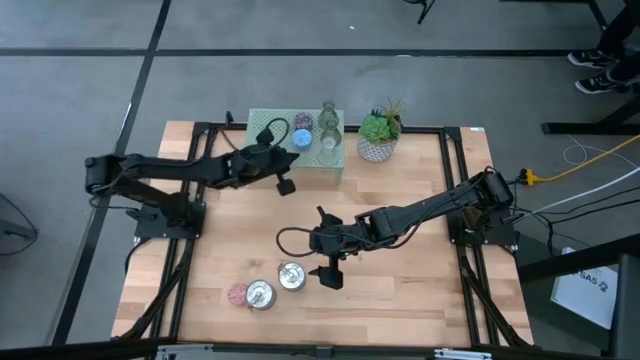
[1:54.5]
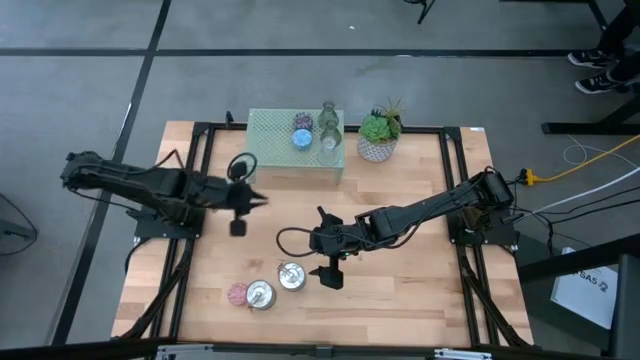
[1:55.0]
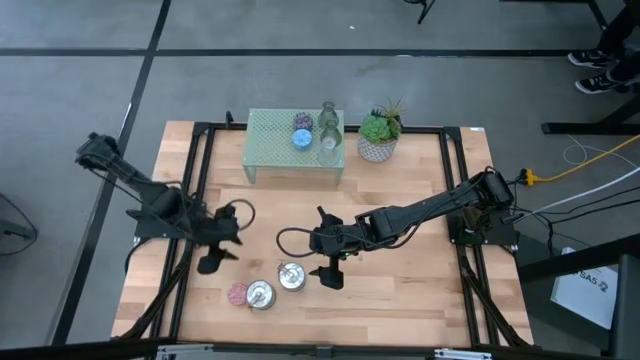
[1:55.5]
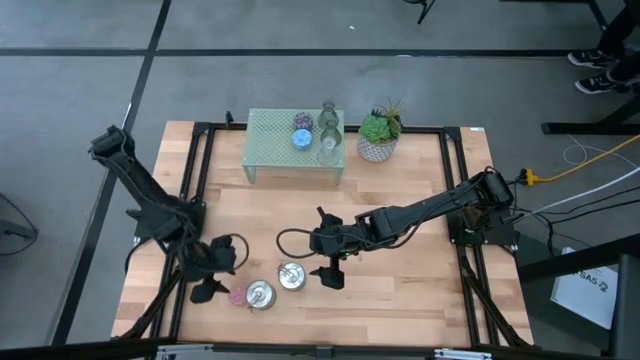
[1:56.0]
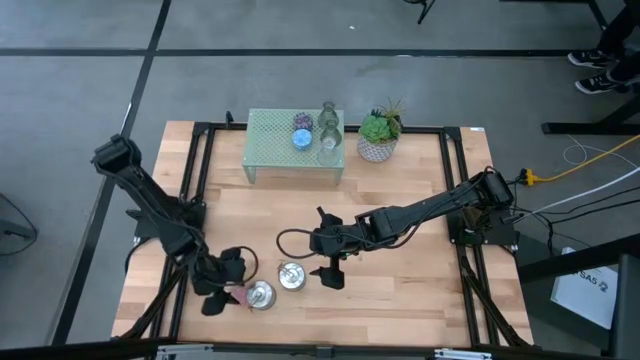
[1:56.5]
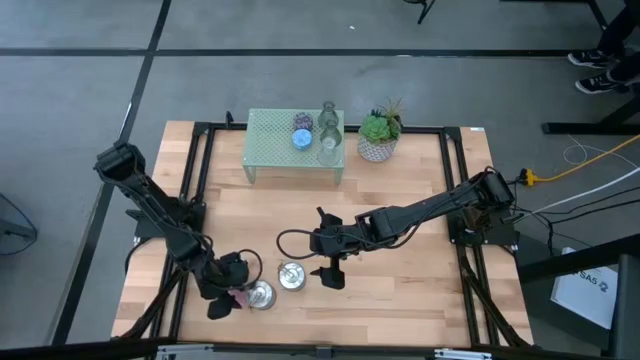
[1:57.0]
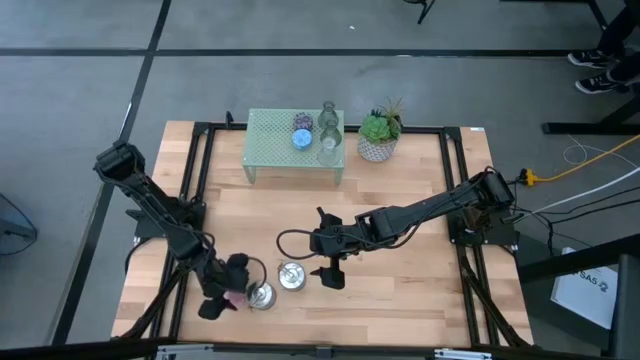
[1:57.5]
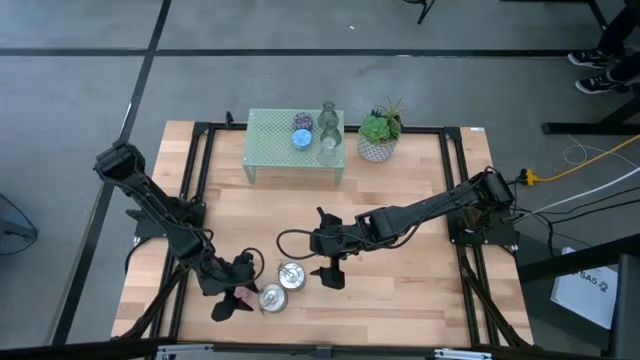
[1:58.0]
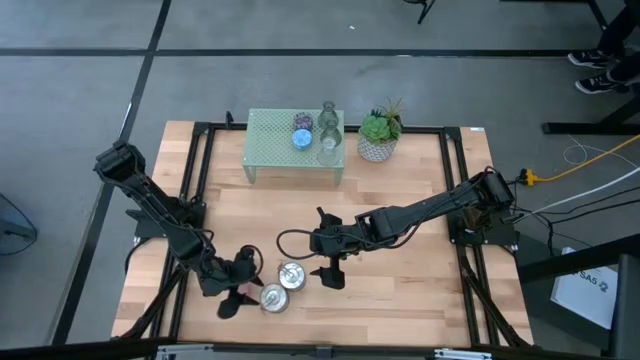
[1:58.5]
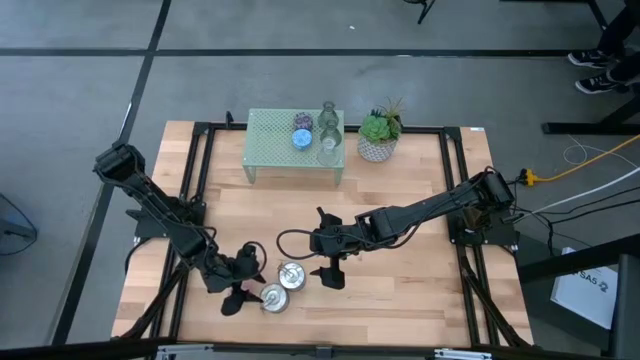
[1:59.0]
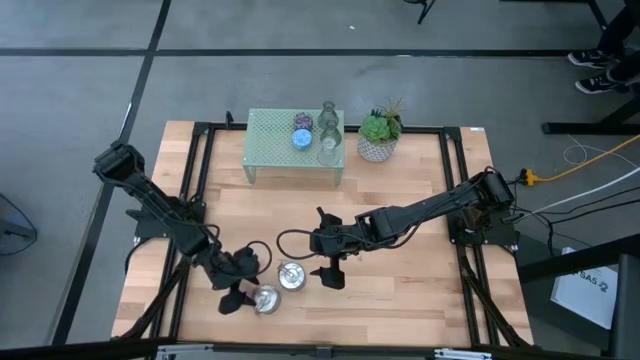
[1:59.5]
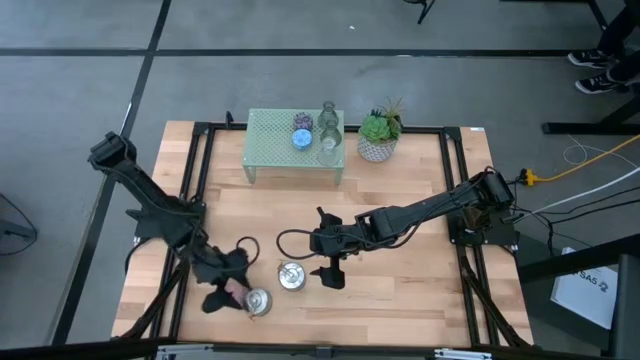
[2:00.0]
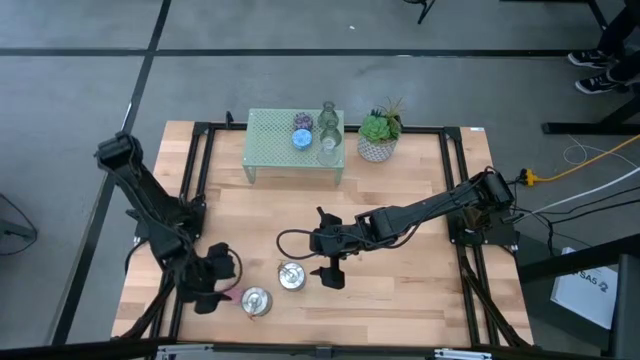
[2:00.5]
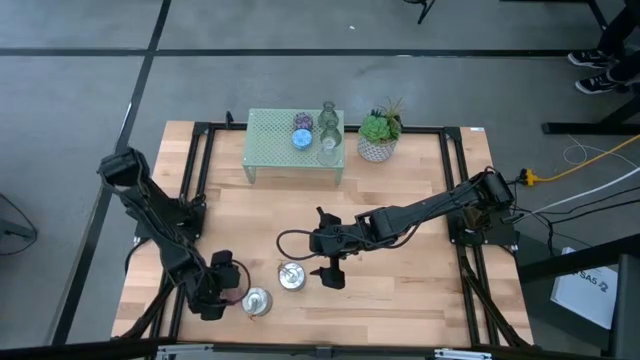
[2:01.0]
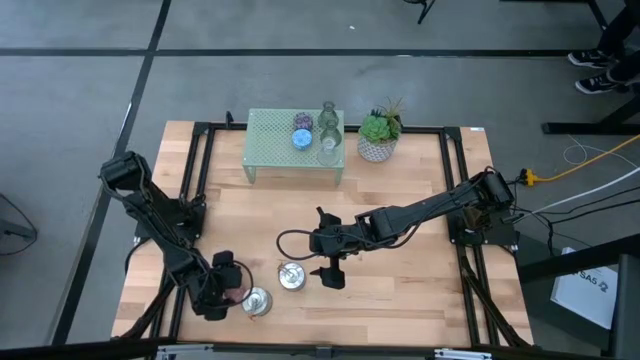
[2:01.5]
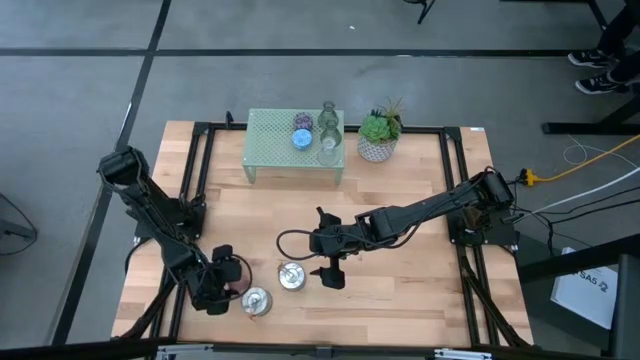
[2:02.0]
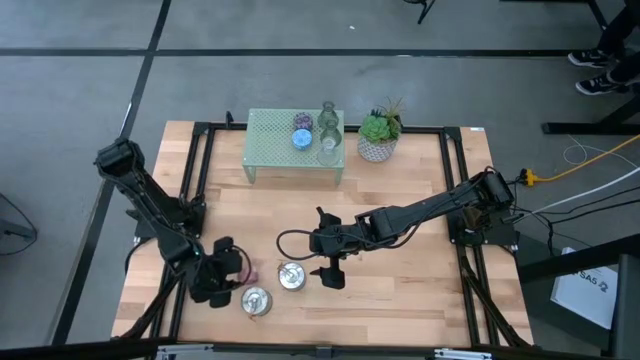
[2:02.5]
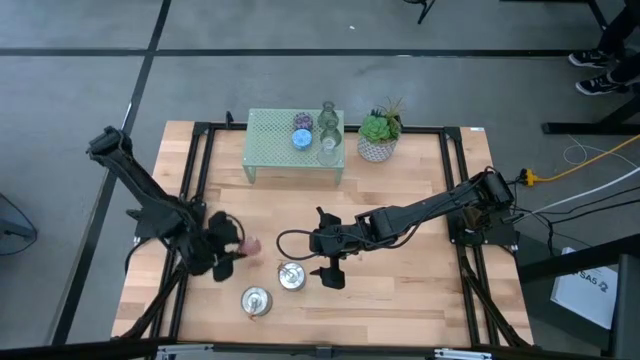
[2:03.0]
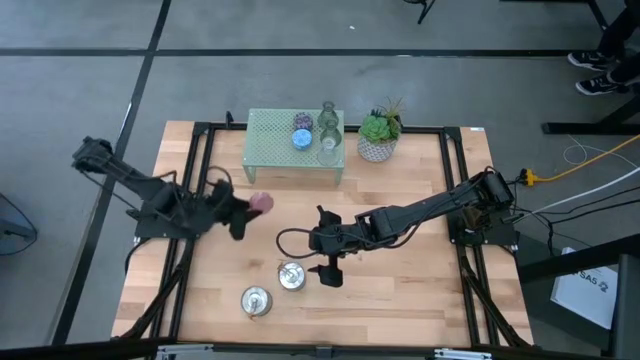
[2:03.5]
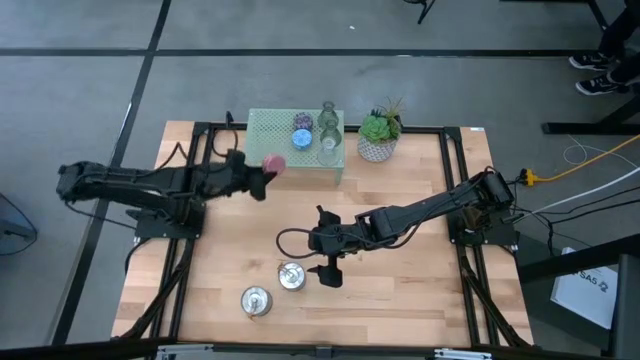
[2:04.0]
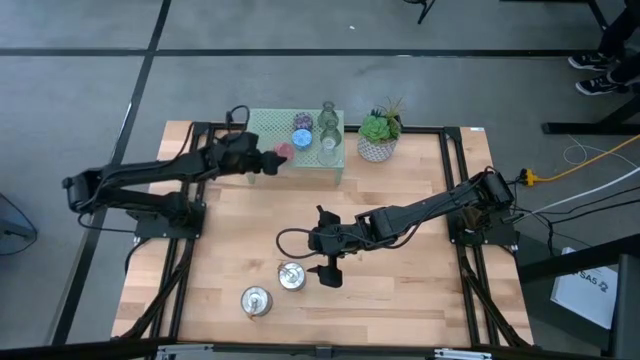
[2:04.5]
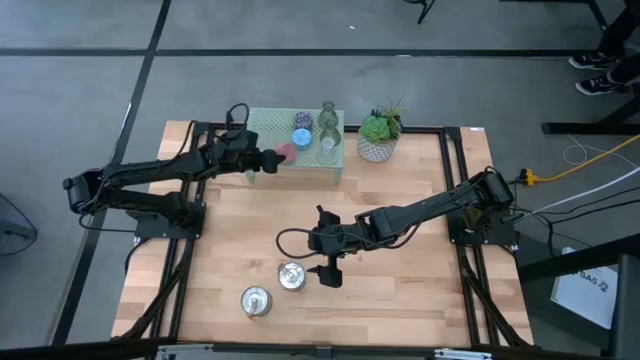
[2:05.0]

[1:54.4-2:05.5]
Task: Pick & Place candle stick holders
Put the red and yellow candle on the shelf

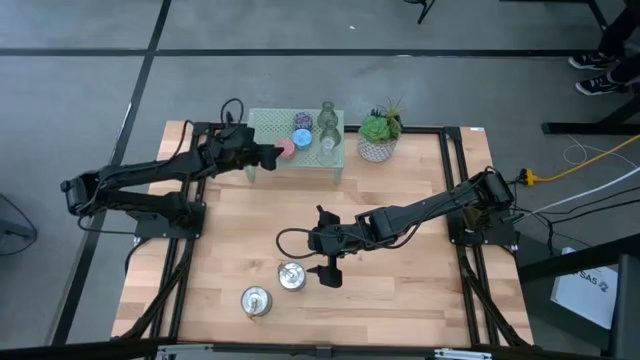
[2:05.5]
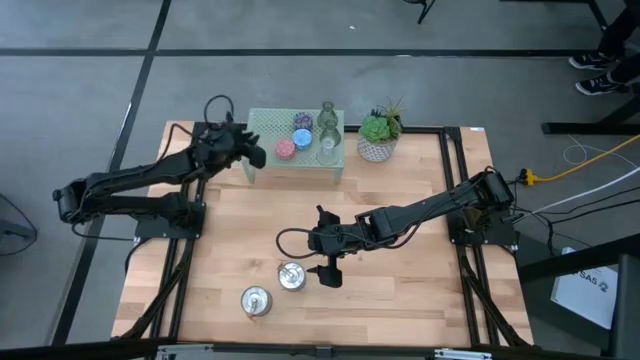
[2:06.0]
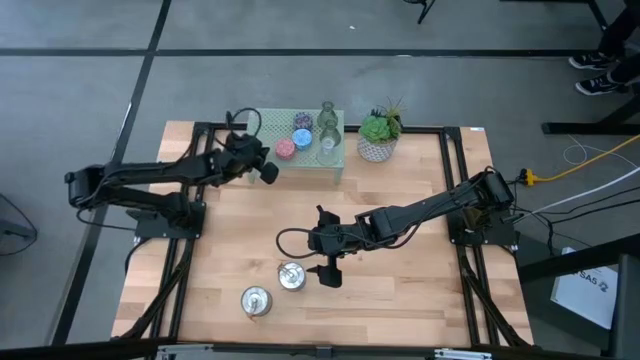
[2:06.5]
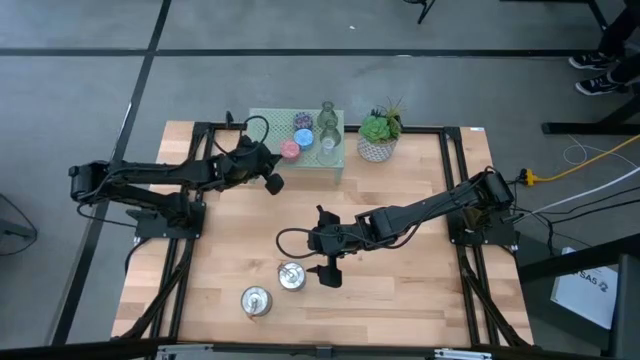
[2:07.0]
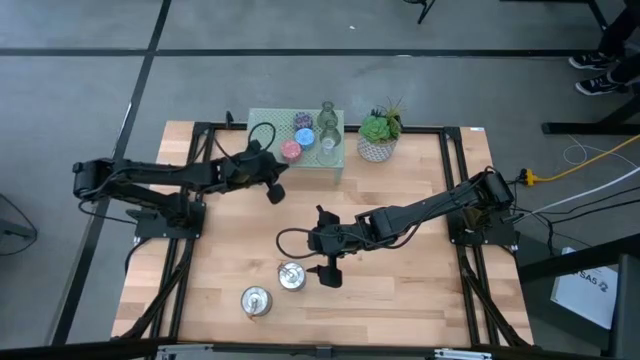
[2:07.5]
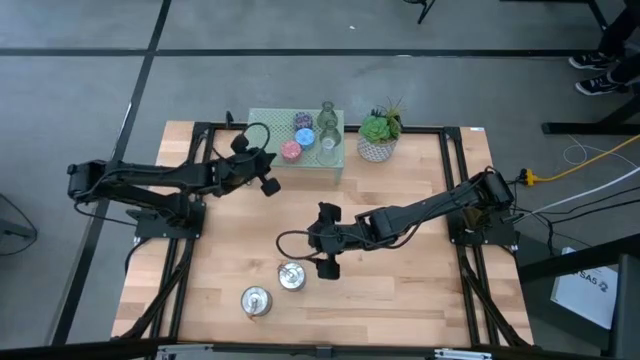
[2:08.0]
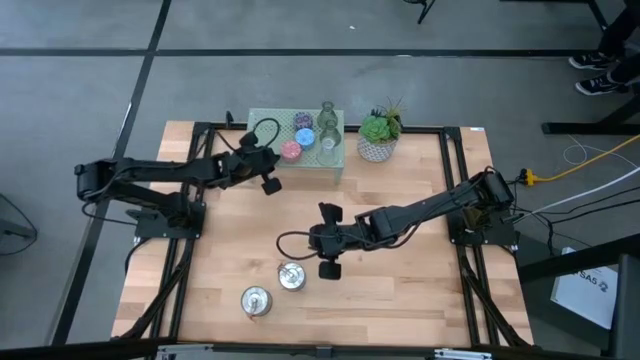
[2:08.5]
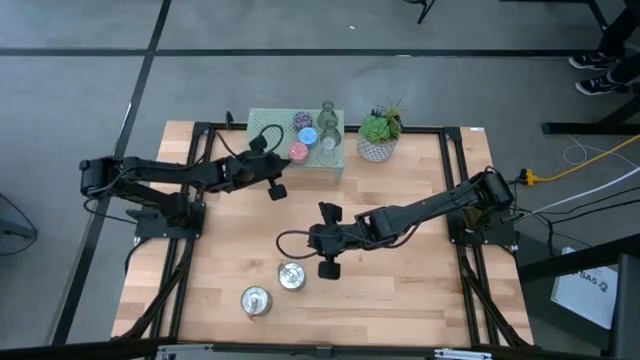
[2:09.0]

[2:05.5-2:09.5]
Adjust the red and yellow candle on the shelf

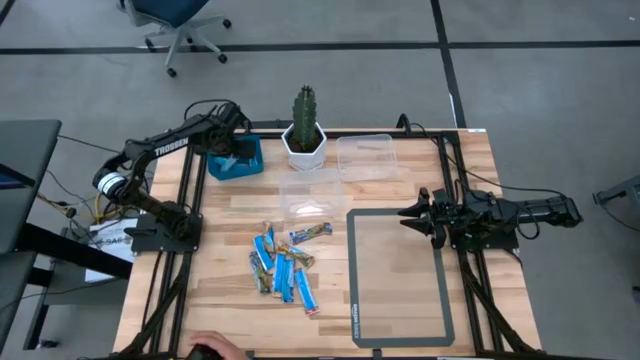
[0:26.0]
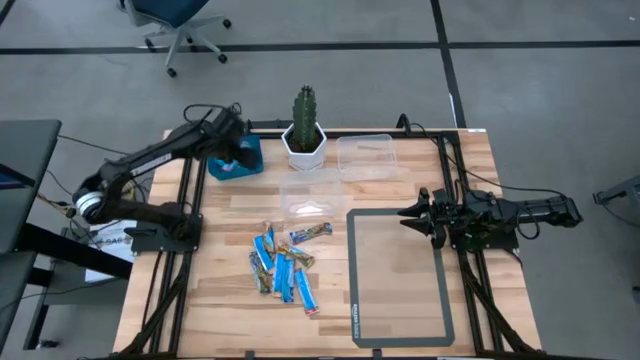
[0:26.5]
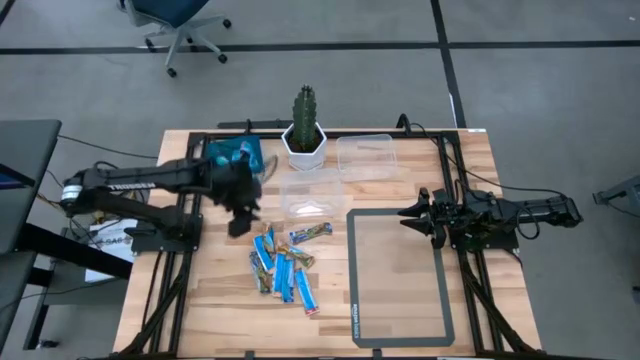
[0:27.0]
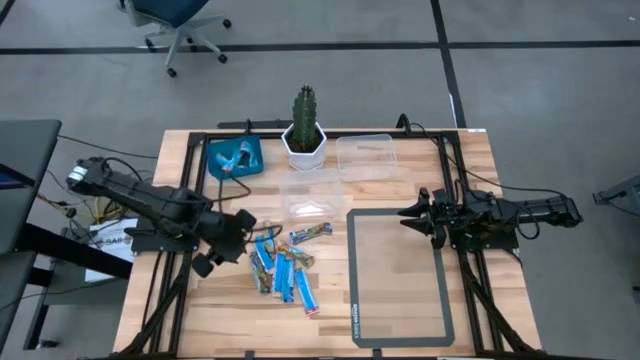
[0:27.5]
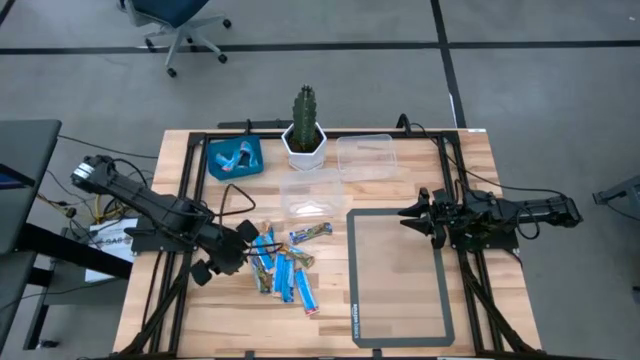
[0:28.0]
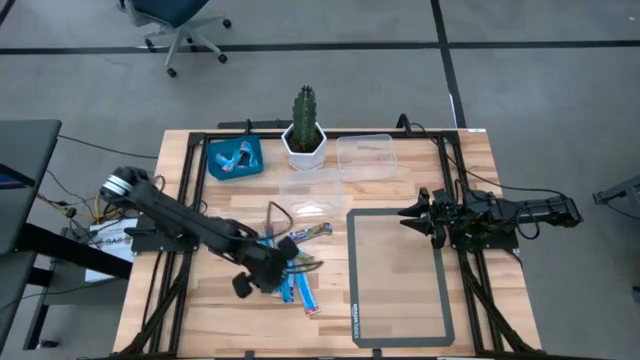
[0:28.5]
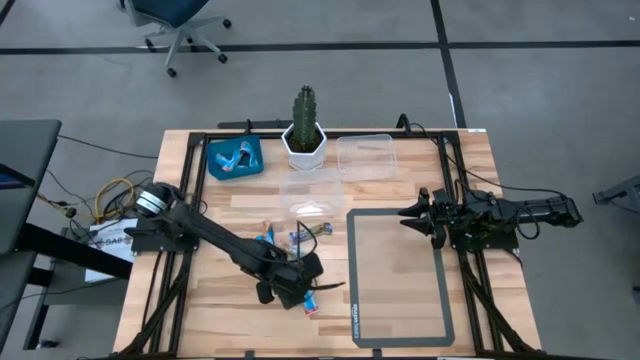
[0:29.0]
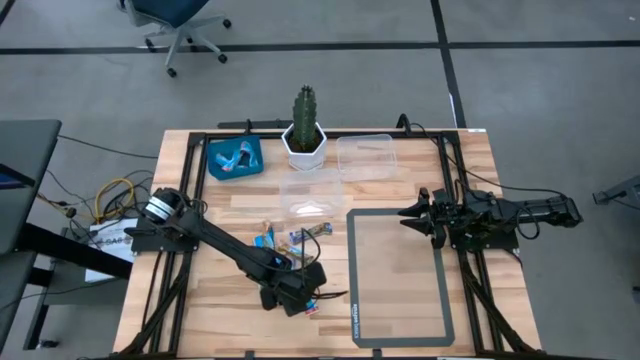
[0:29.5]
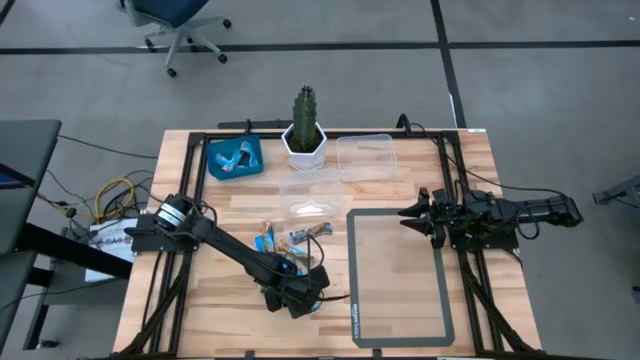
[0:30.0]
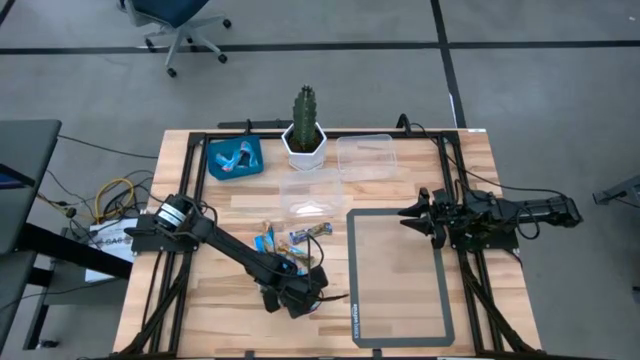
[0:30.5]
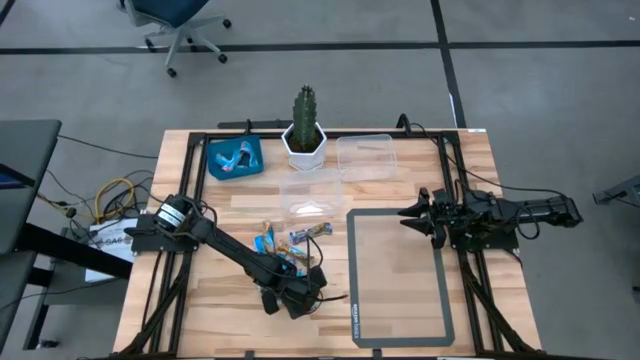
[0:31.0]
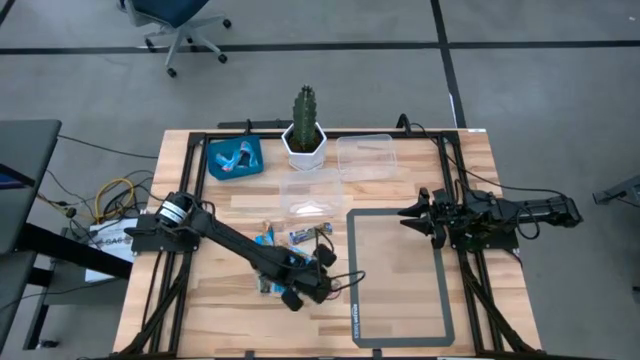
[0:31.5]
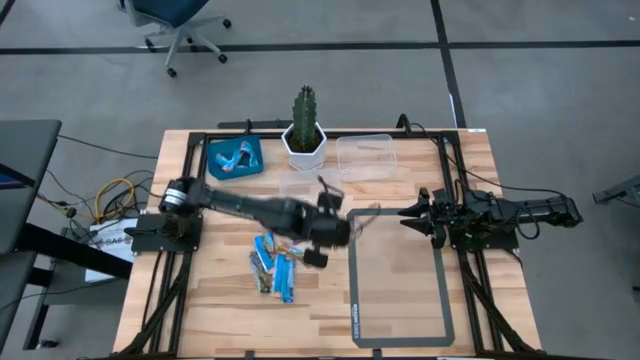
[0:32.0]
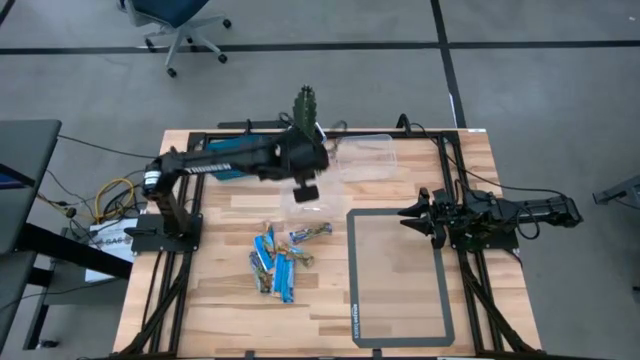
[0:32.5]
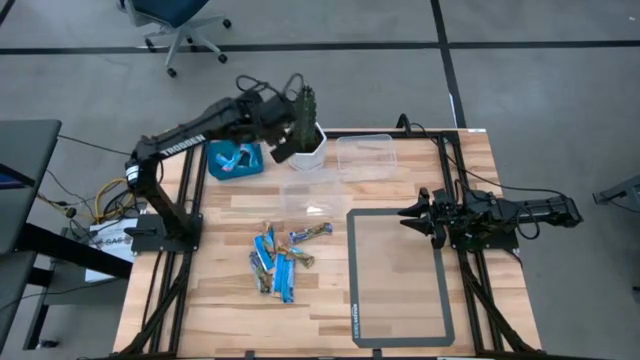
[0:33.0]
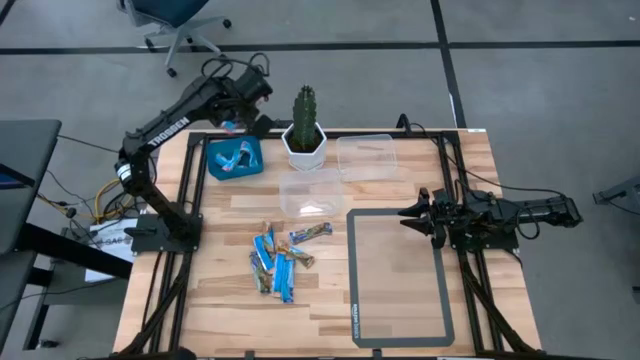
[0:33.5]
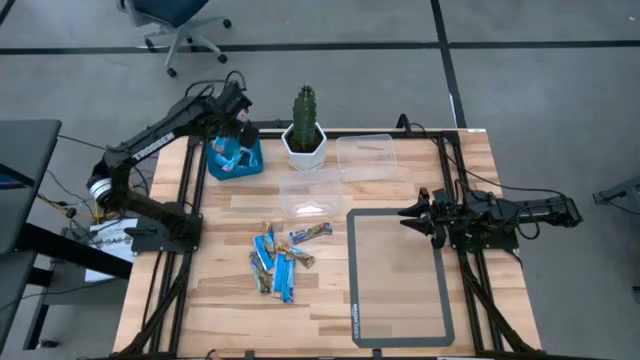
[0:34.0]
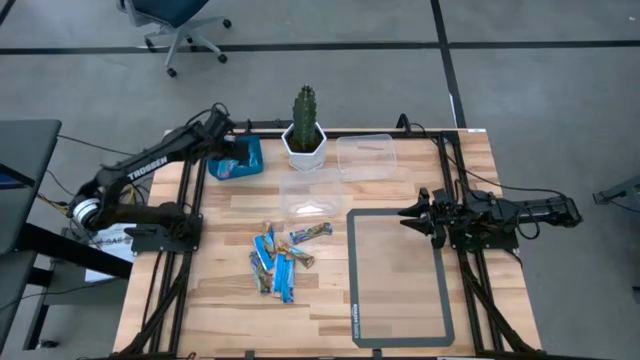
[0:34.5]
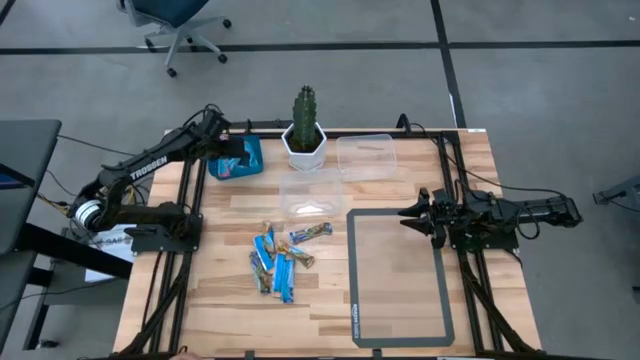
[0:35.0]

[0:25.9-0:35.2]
Task: Pick and place Granola Bars by type
Put the red granola bar into the blue bin
